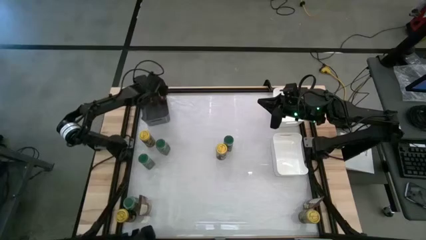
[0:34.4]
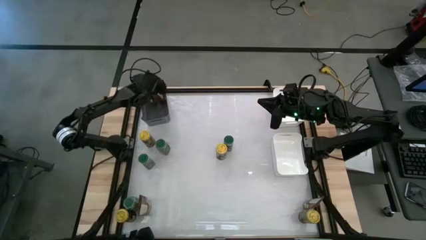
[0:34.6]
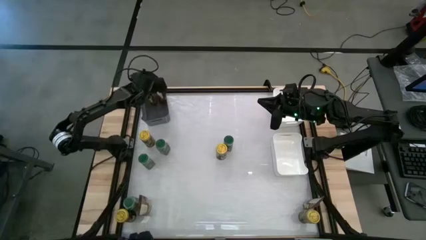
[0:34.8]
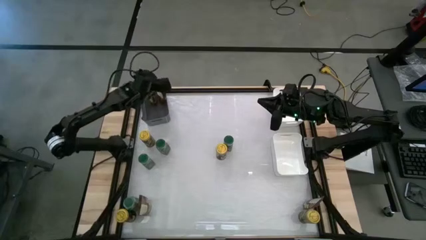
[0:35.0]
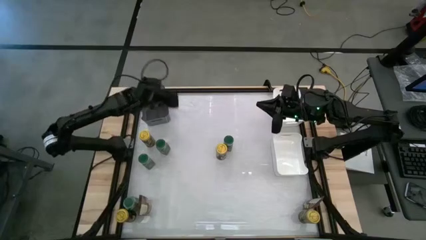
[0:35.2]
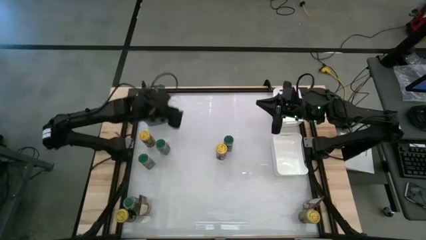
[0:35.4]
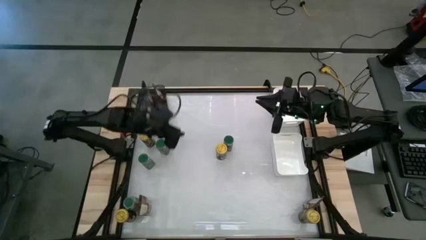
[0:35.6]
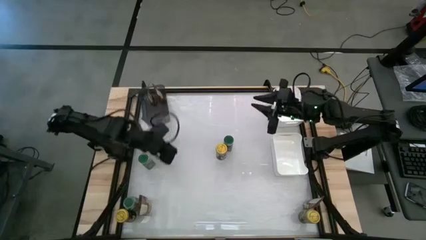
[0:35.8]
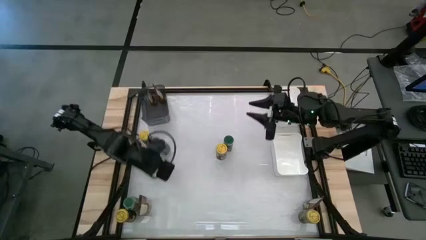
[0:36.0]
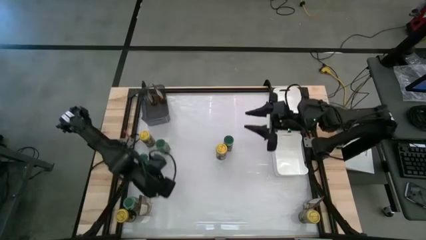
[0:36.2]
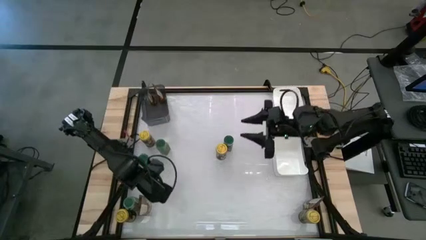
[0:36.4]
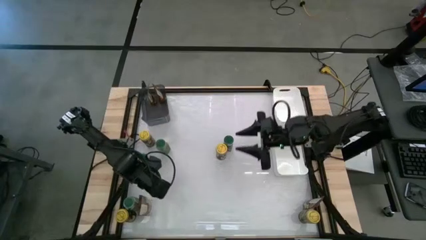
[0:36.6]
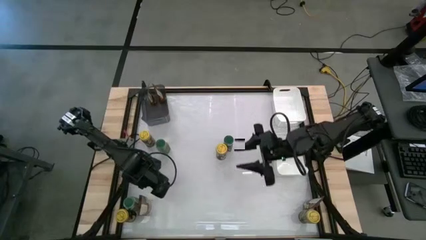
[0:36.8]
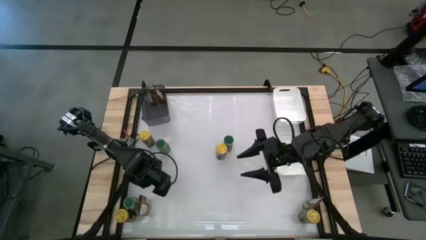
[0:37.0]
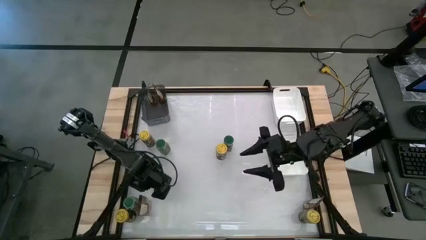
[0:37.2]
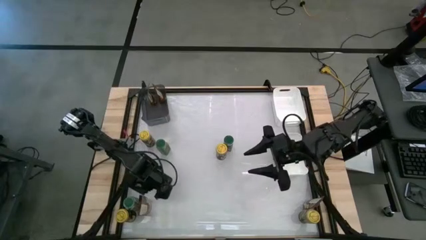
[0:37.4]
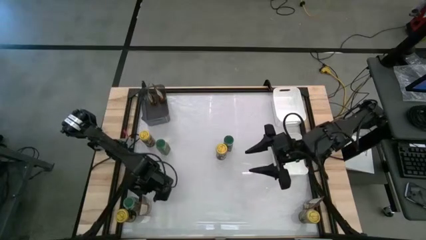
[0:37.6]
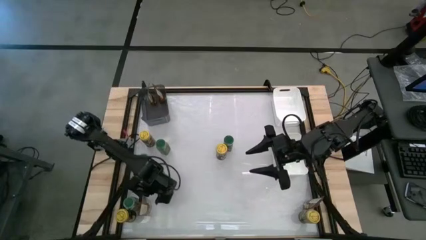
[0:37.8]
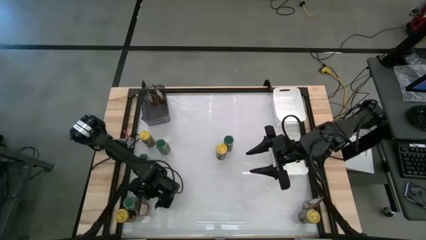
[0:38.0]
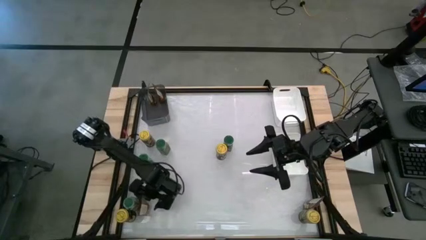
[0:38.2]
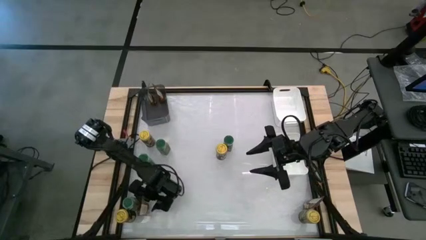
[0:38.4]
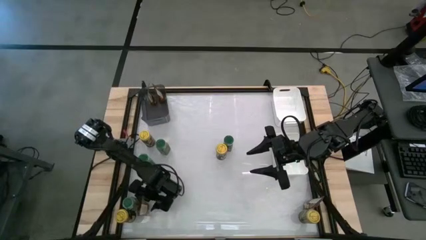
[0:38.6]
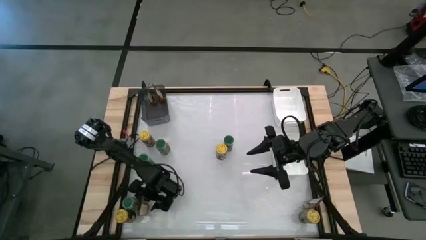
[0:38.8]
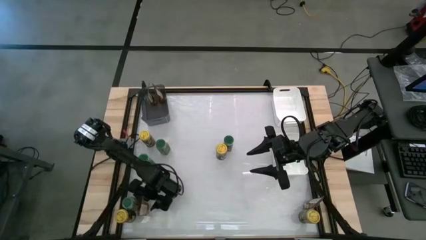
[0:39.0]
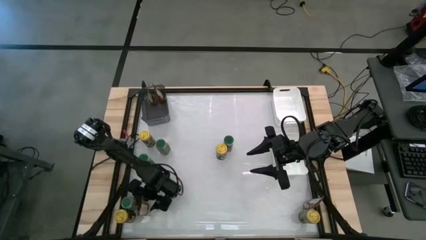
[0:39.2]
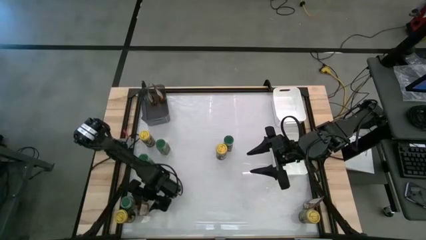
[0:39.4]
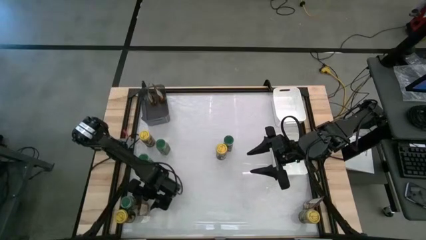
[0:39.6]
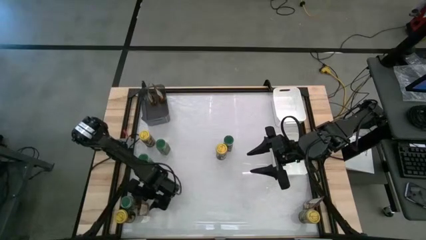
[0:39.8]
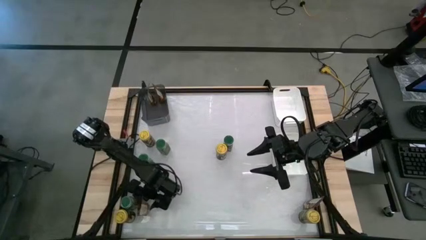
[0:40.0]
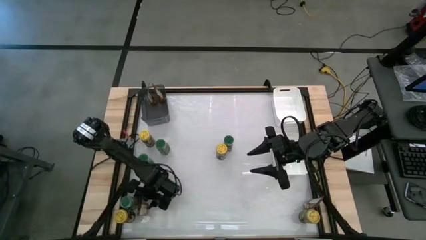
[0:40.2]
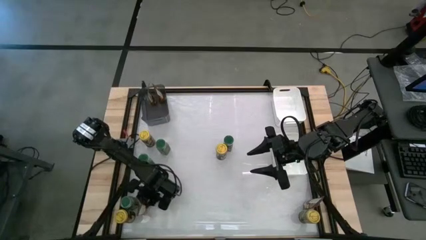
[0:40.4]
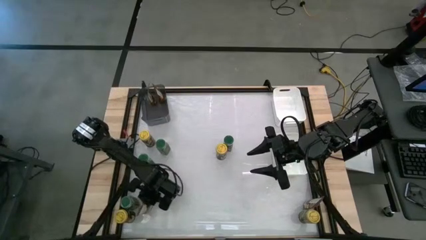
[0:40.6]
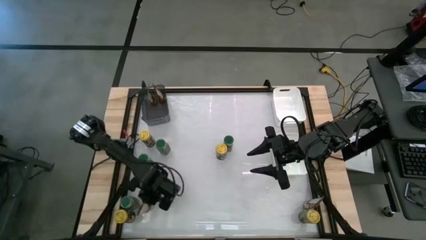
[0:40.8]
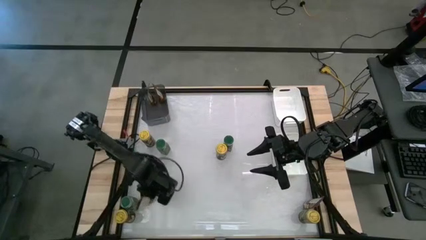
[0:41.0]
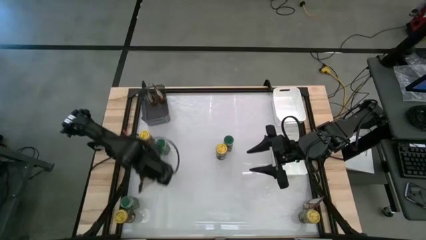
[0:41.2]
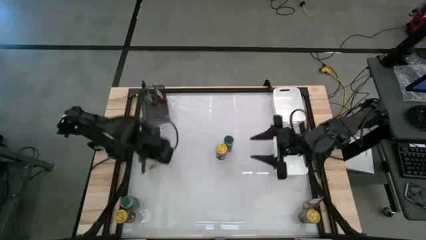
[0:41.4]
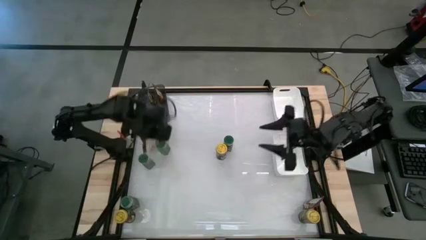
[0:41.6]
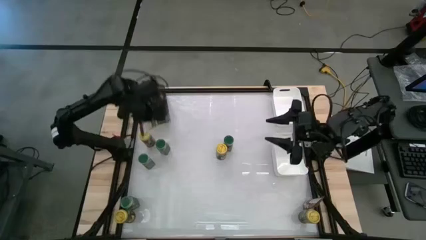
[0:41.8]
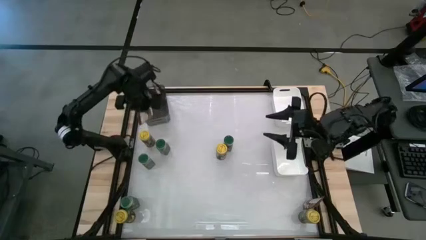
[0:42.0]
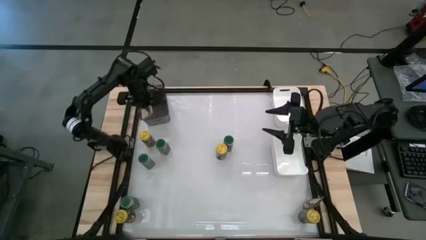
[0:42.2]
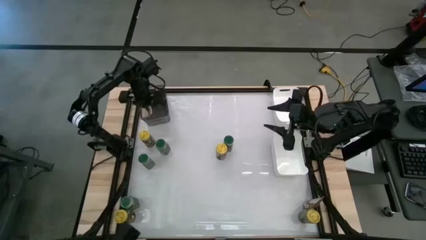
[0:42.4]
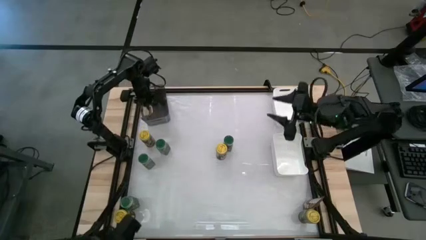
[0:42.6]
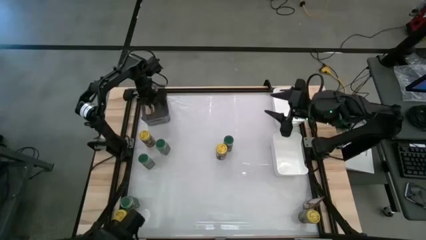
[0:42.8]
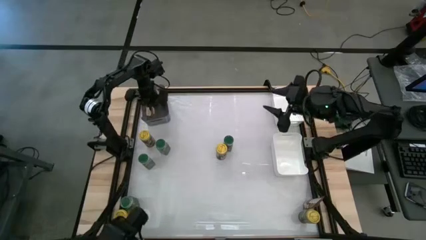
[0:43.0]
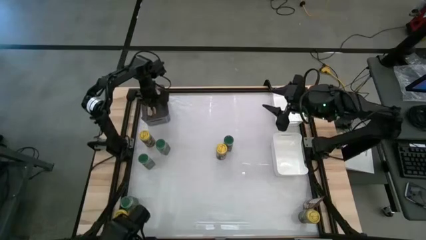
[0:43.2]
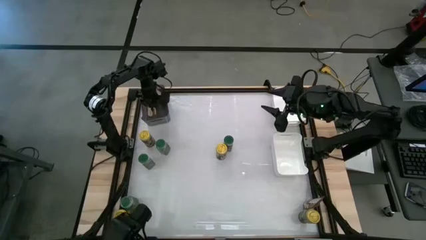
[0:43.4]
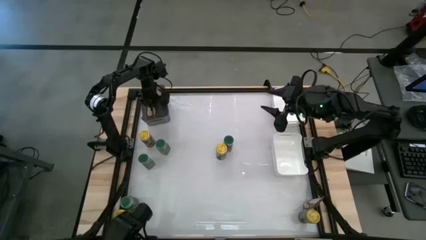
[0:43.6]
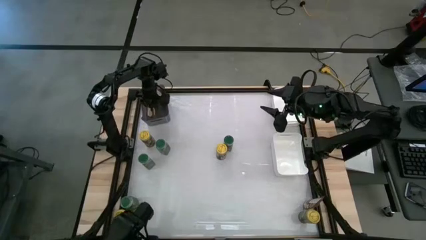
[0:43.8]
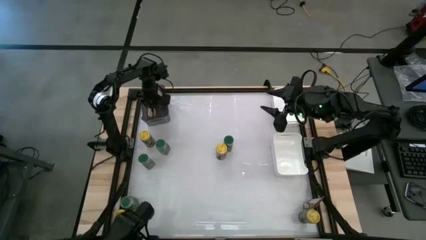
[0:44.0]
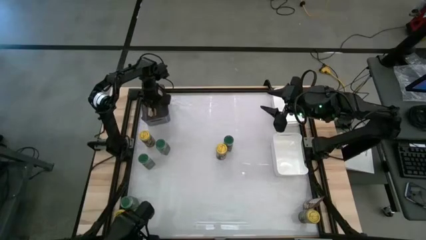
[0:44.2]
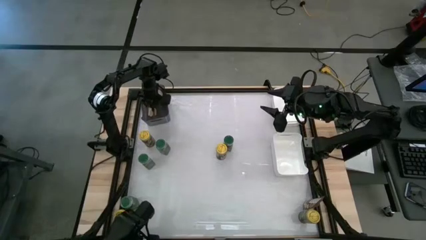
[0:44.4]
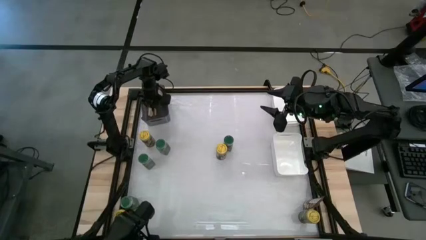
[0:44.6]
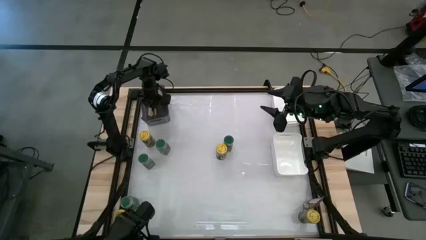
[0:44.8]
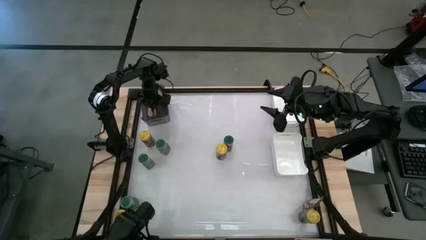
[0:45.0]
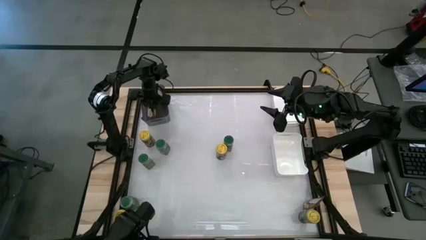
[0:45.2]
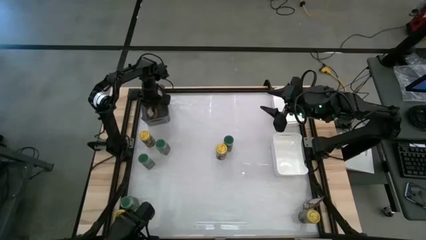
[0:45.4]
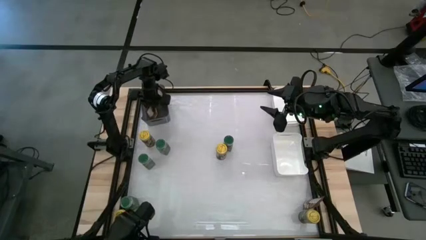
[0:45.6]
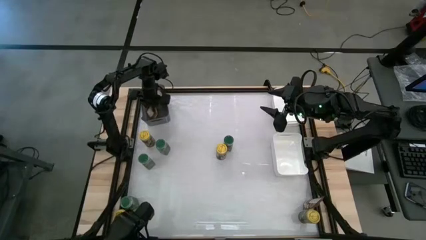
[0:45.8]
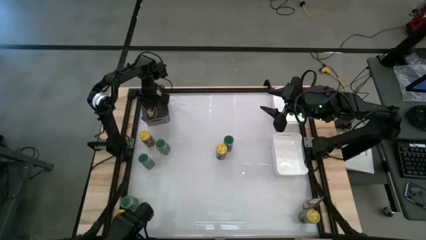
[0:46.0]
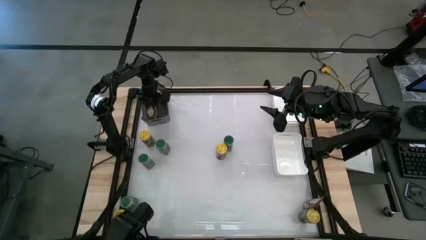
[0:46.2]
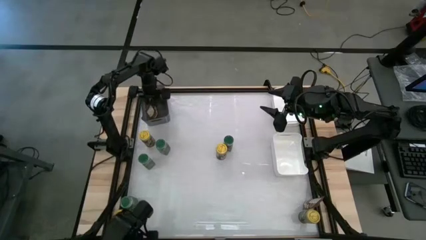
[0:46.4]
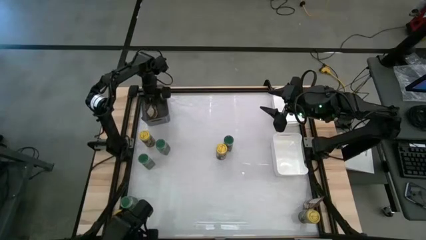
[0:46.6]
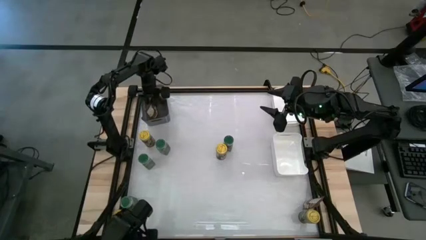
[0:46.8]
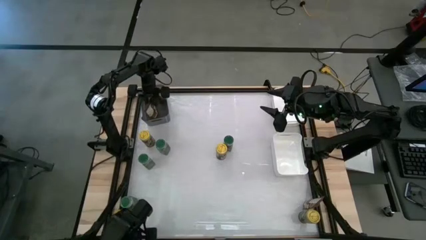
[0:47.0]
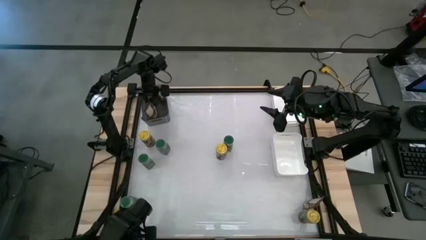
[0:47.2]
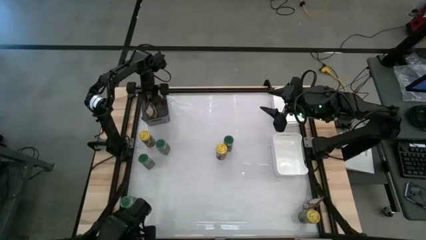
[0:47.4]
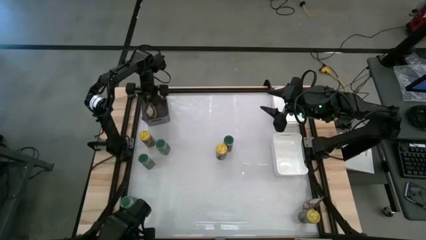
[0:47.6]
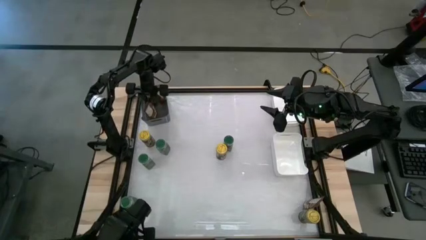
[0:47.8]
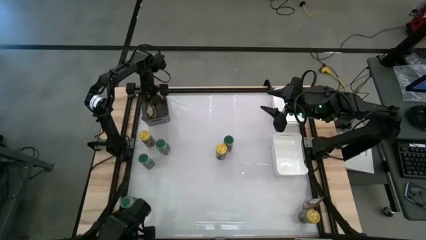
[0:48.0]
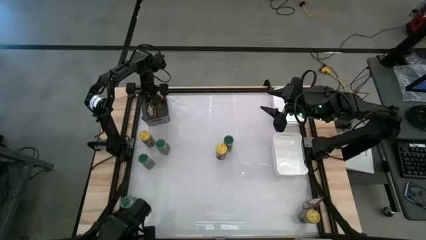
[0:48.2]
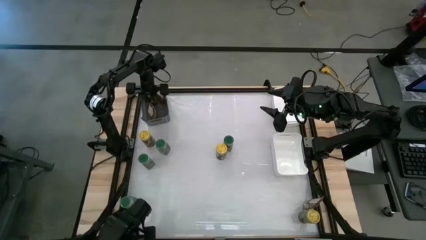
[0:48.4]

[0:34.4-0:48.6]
Task: Sort spices by type
Put the orange seasoning bag into the black bin
